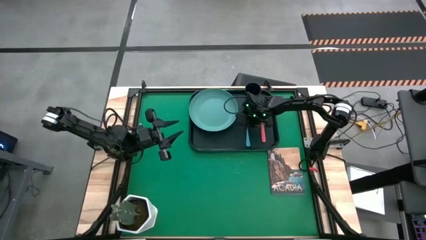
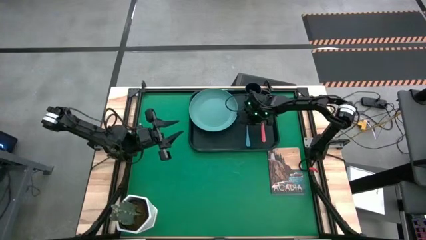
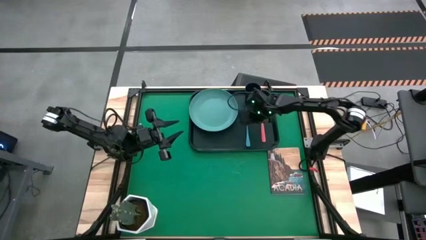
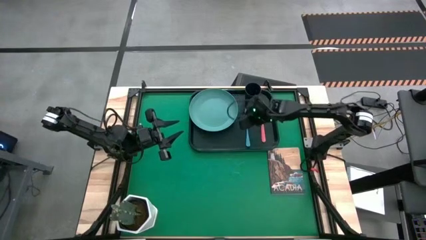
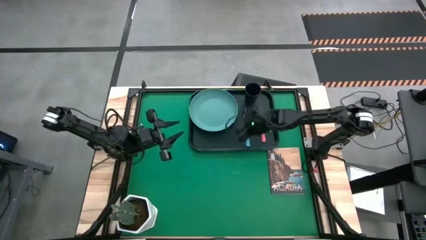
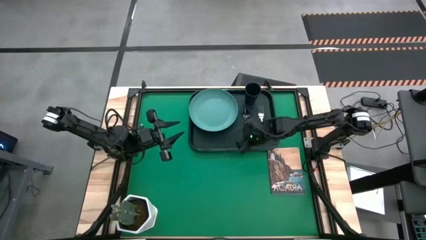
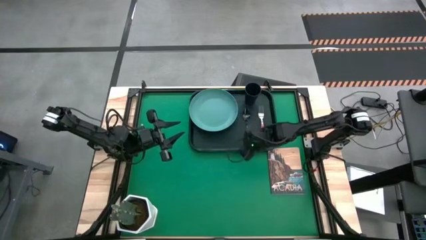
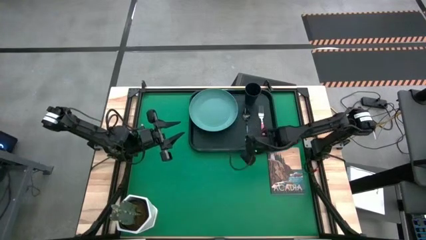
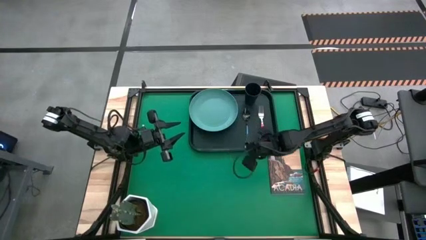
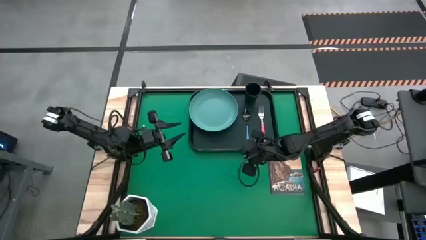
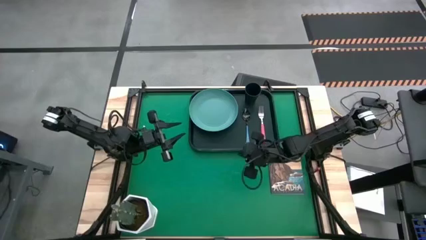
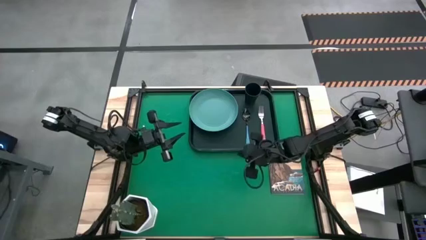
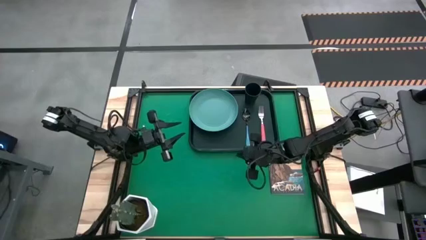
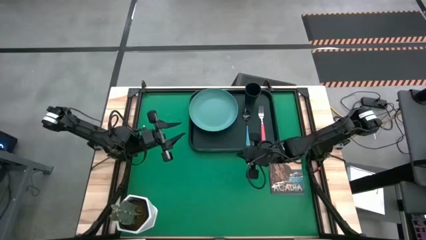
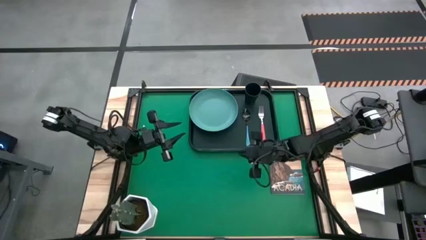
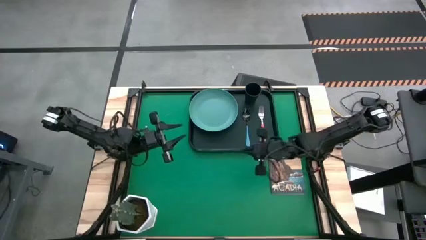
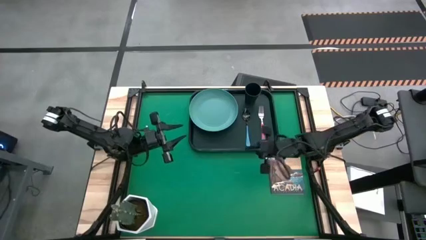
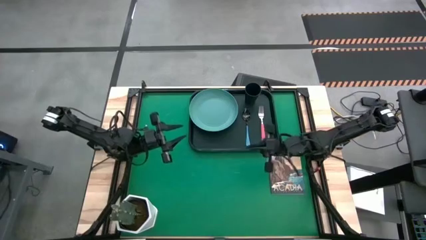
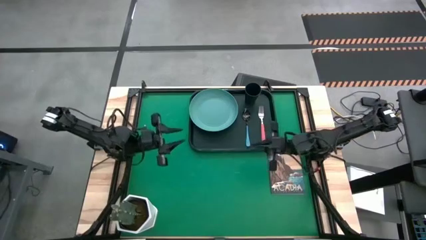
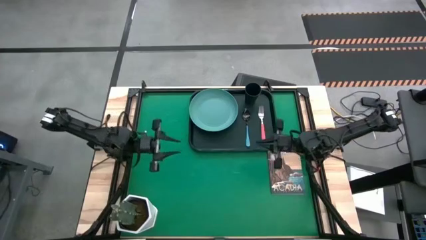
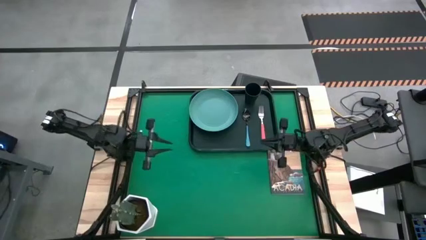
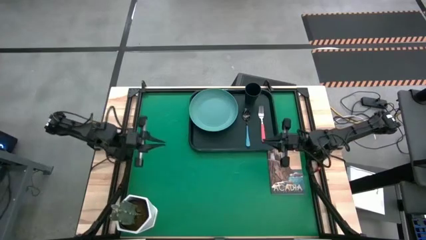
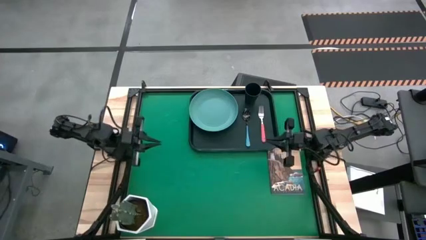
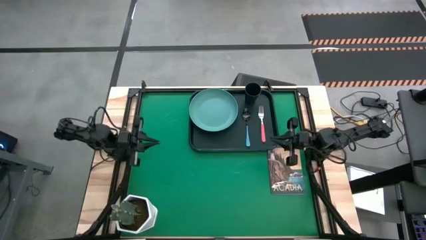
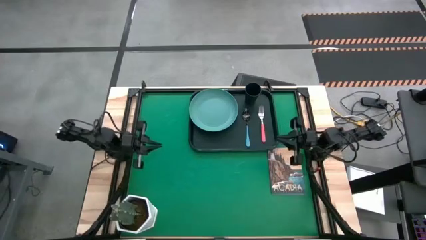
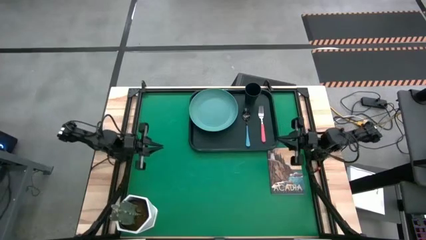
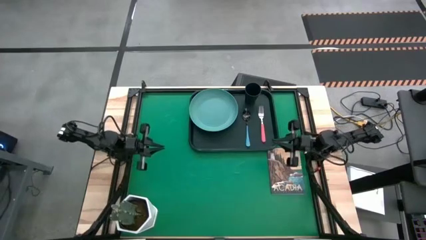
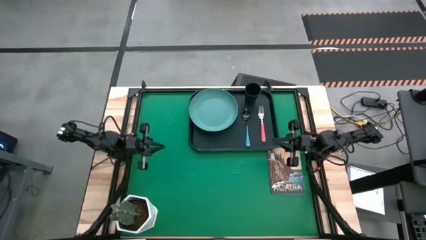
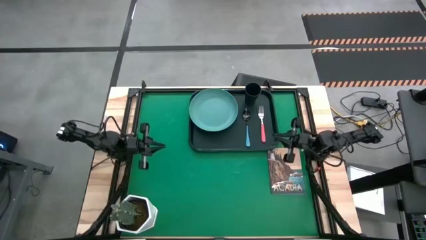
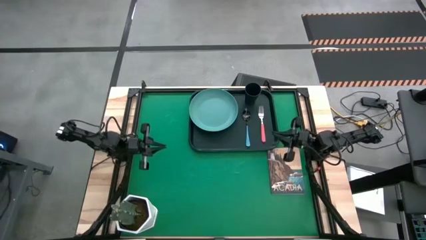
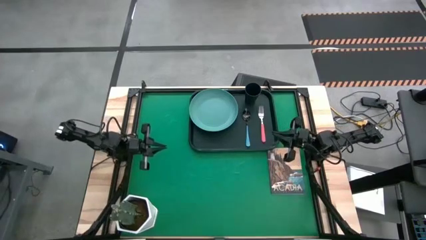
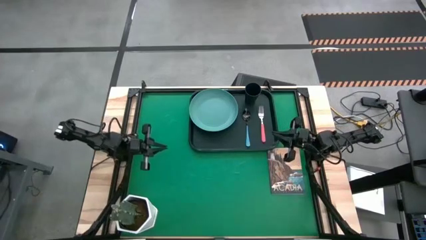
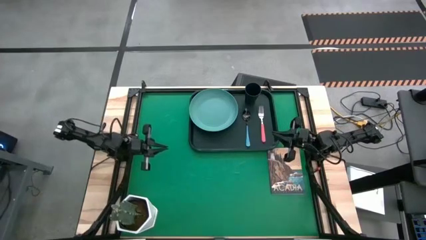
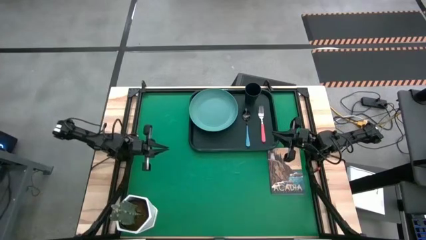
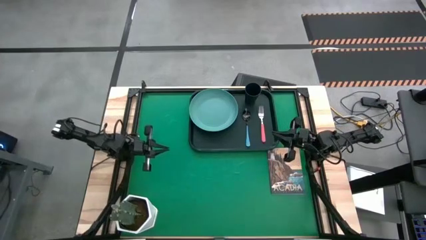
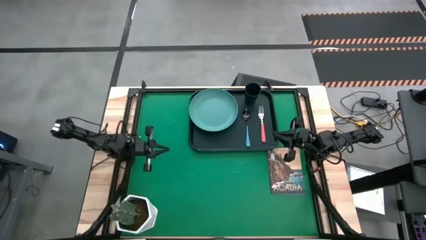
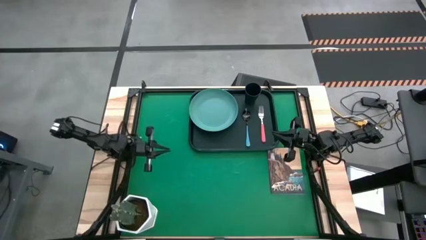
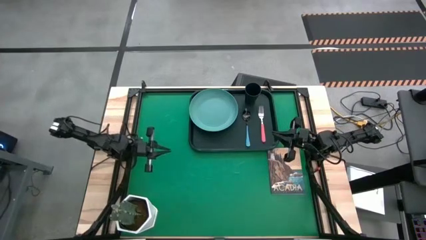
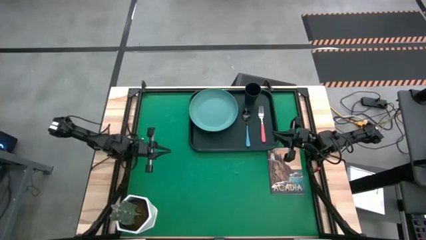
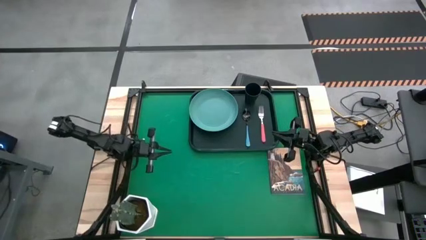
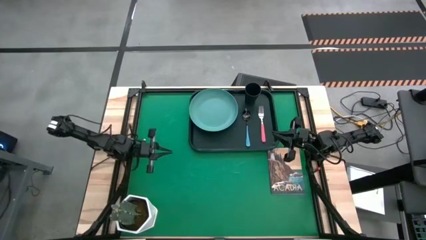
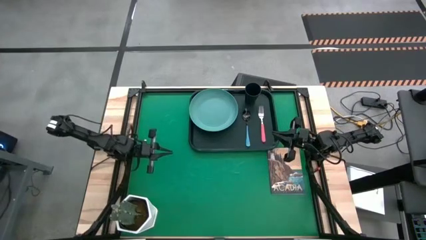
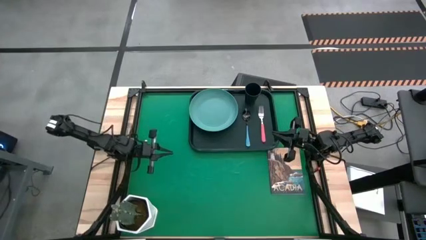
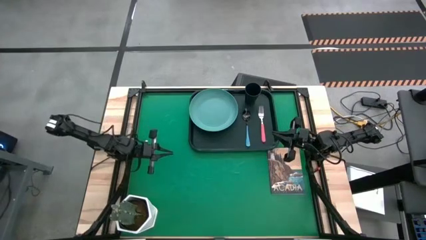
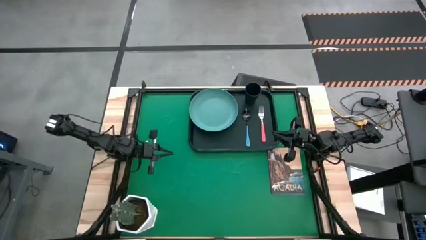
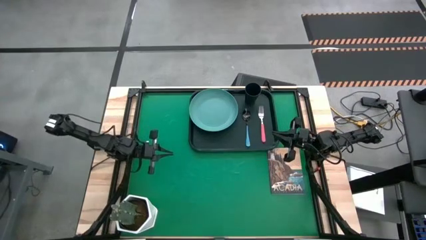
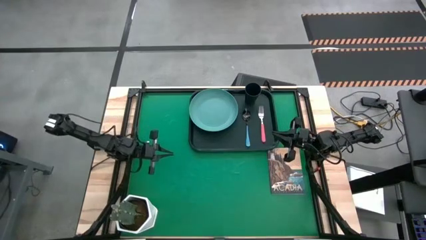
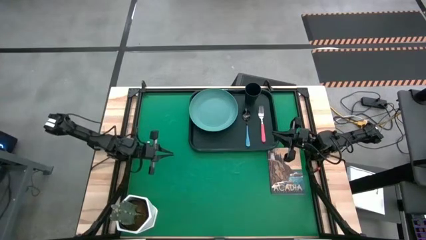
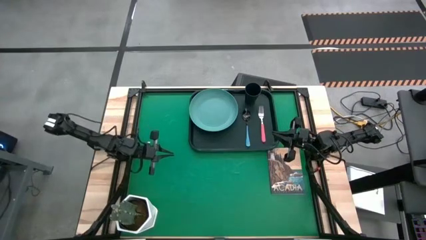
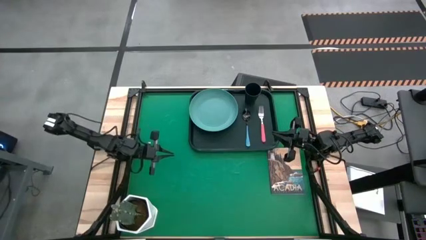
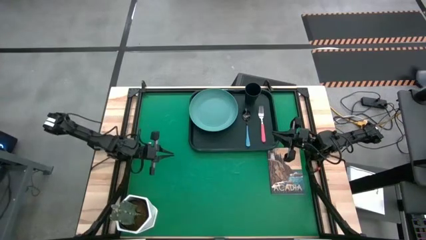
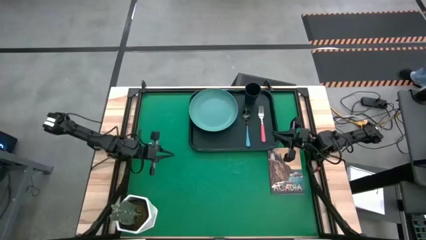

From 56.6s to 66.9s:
Task: Pick and place plate/cup/fork/spoon on tray
Return to Home Position
